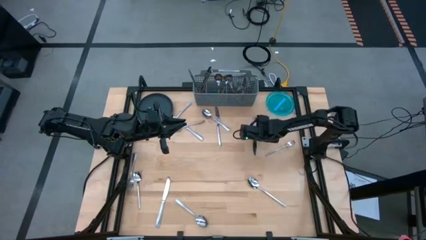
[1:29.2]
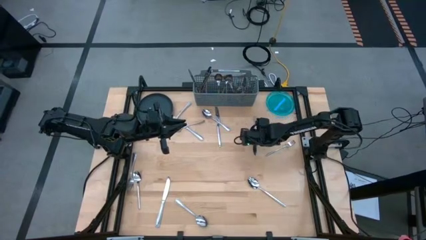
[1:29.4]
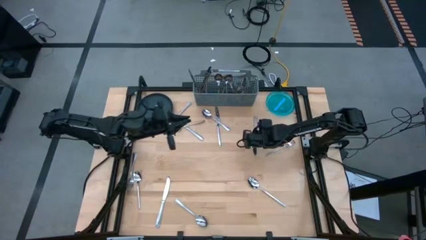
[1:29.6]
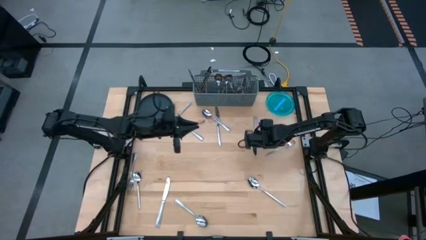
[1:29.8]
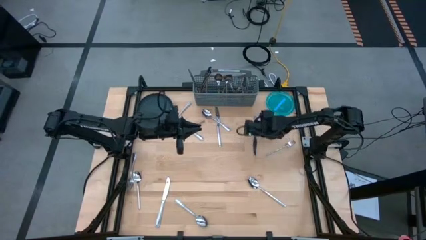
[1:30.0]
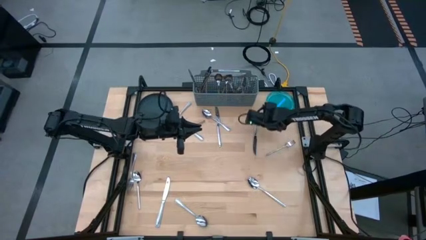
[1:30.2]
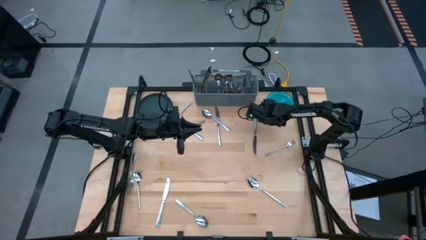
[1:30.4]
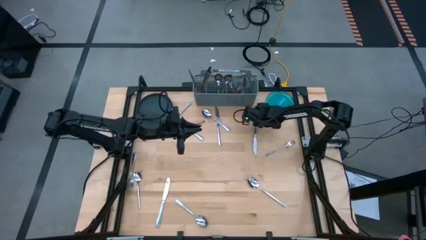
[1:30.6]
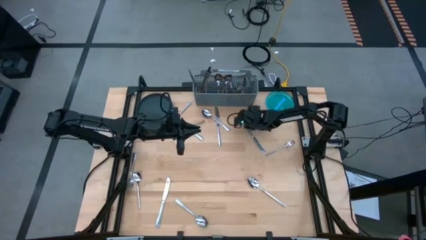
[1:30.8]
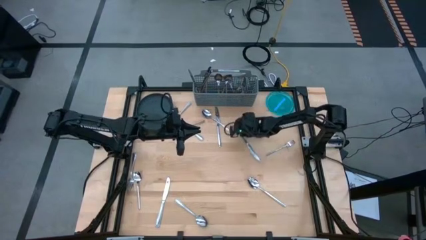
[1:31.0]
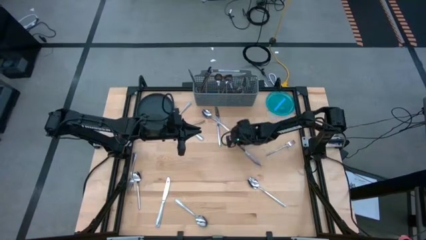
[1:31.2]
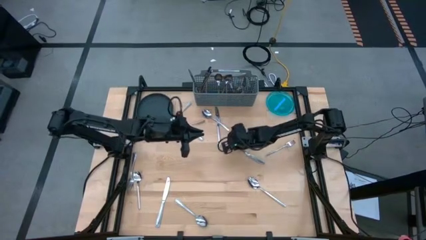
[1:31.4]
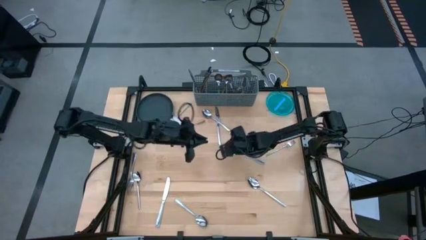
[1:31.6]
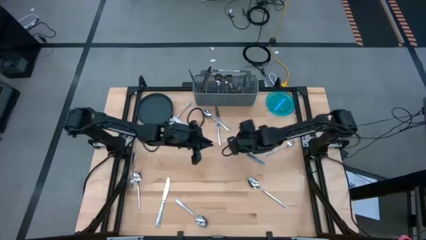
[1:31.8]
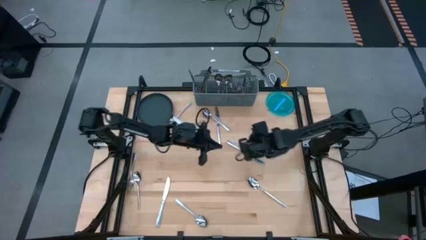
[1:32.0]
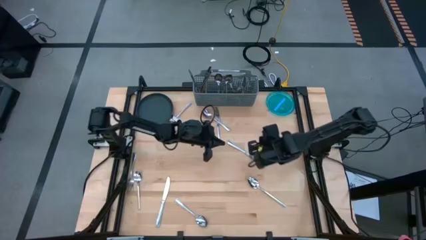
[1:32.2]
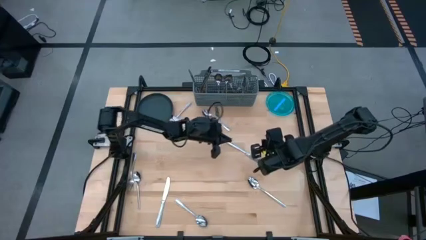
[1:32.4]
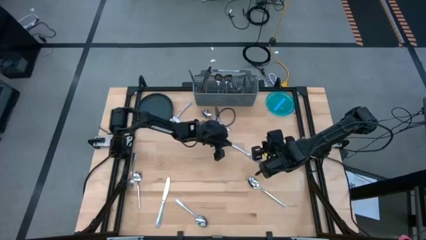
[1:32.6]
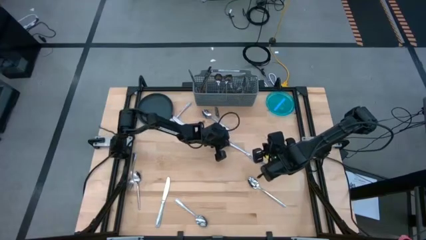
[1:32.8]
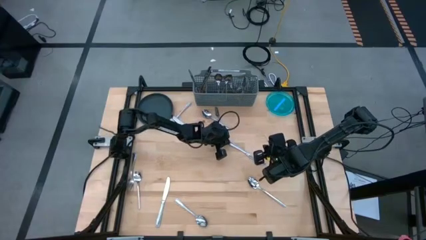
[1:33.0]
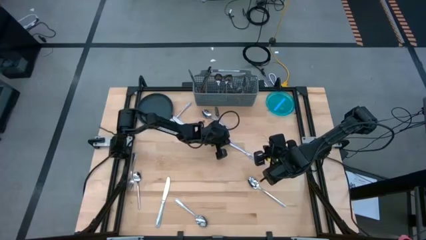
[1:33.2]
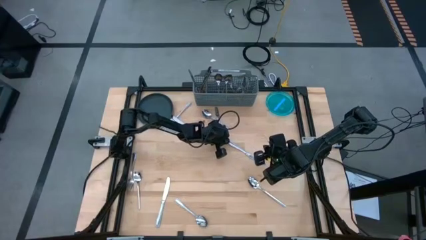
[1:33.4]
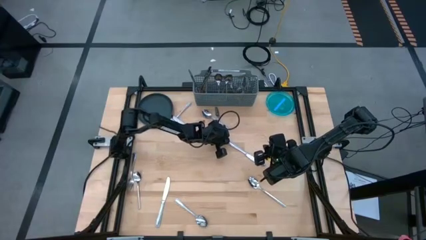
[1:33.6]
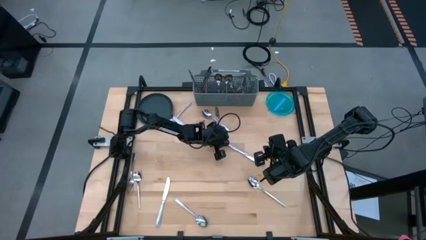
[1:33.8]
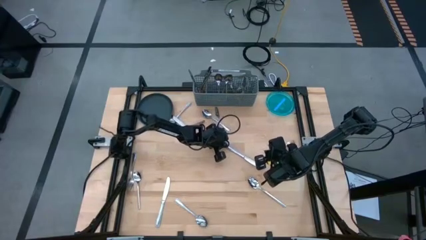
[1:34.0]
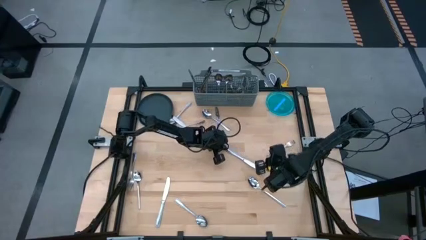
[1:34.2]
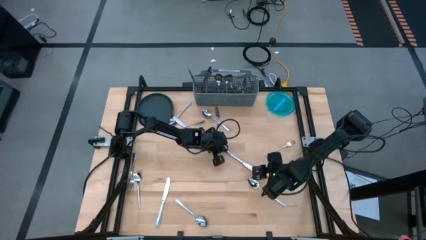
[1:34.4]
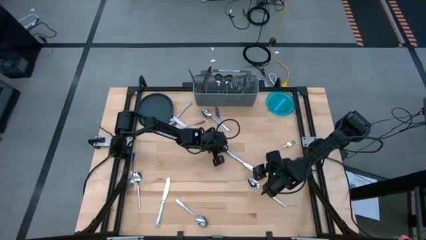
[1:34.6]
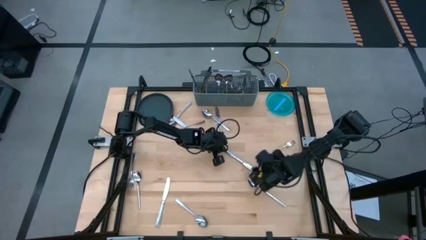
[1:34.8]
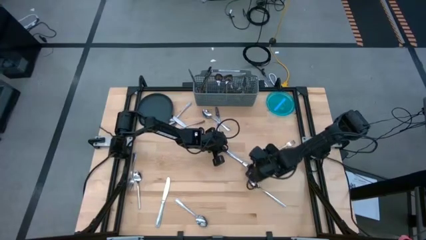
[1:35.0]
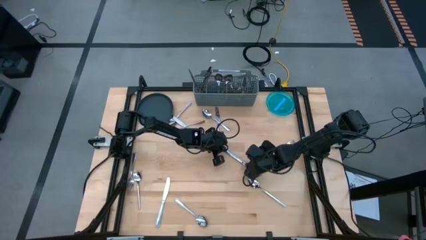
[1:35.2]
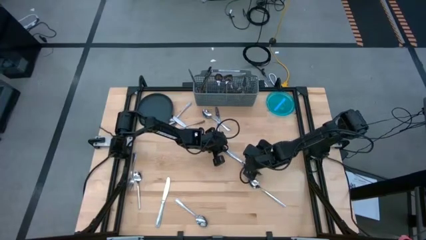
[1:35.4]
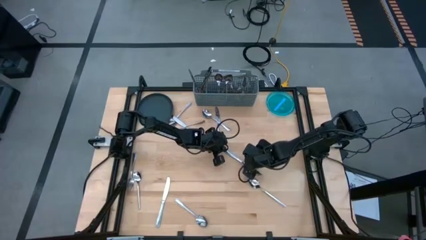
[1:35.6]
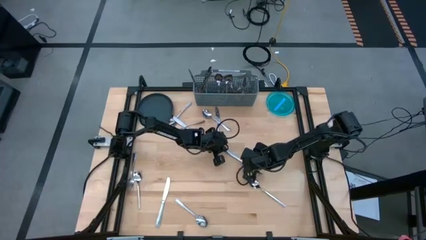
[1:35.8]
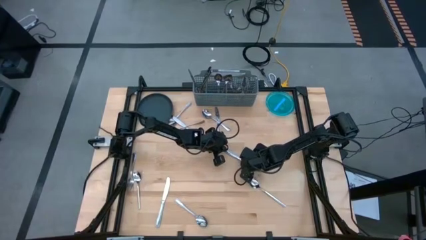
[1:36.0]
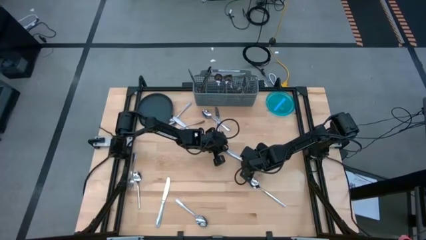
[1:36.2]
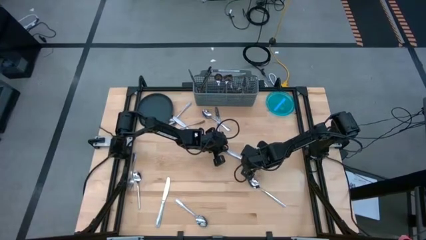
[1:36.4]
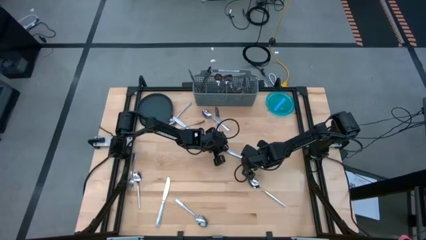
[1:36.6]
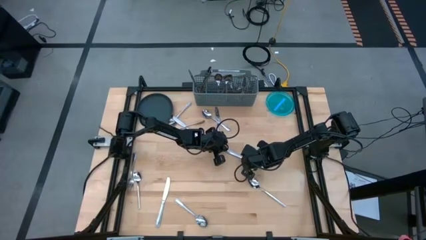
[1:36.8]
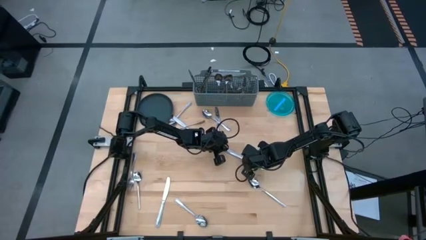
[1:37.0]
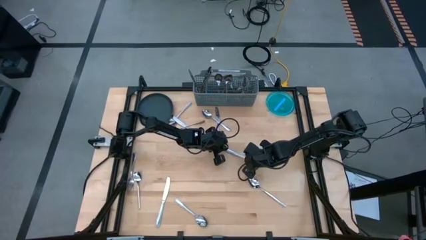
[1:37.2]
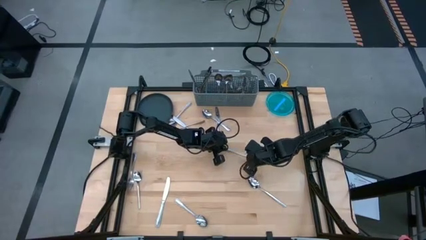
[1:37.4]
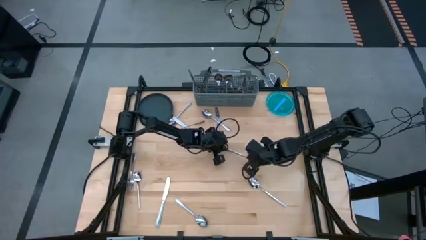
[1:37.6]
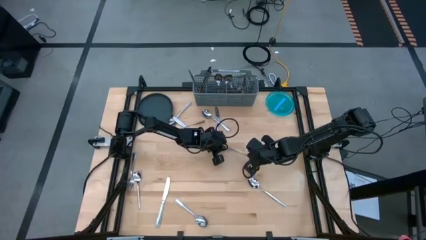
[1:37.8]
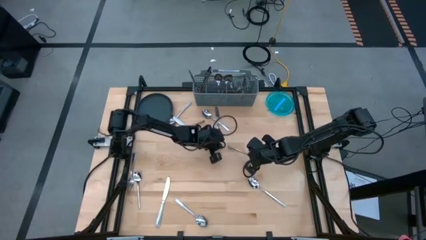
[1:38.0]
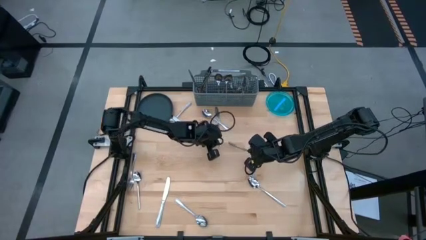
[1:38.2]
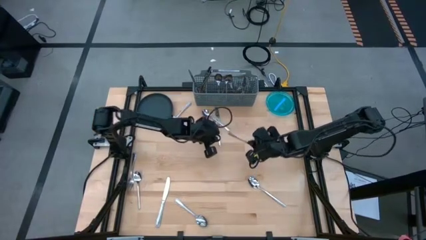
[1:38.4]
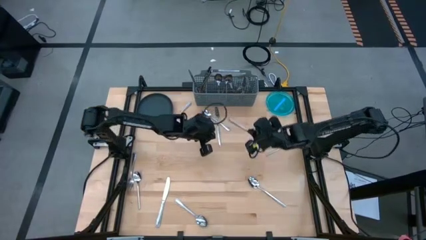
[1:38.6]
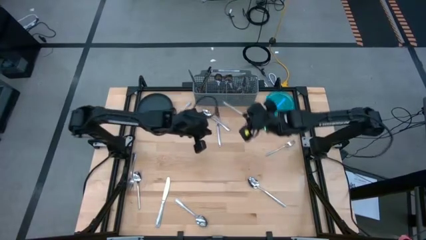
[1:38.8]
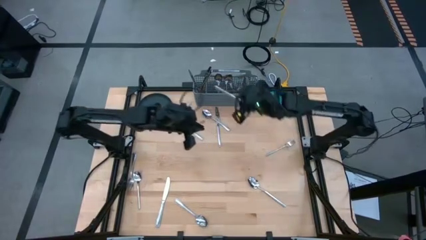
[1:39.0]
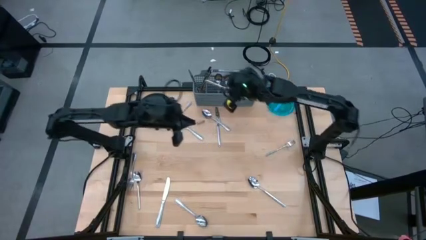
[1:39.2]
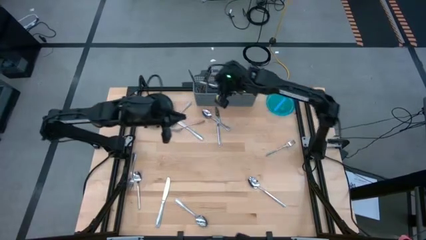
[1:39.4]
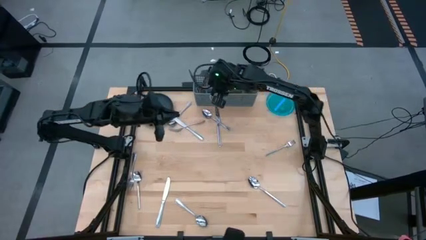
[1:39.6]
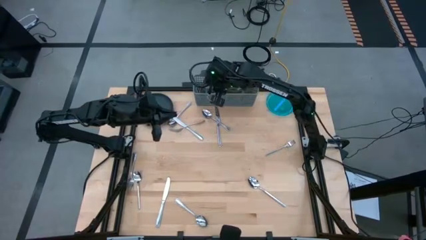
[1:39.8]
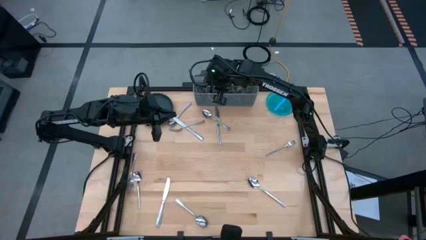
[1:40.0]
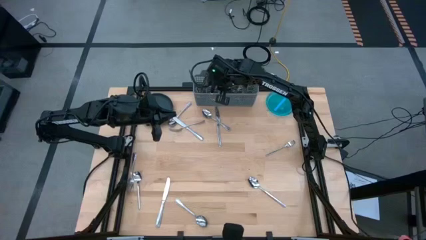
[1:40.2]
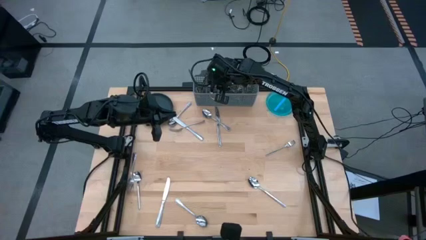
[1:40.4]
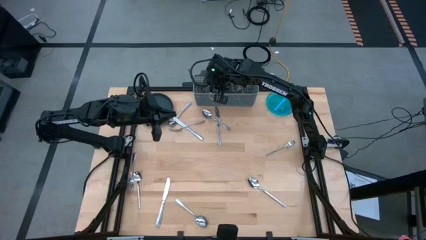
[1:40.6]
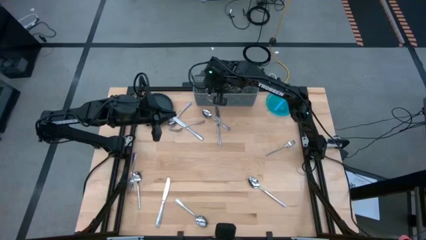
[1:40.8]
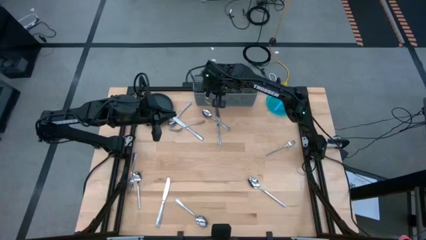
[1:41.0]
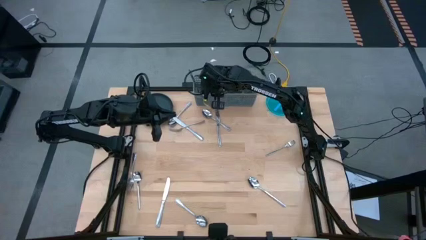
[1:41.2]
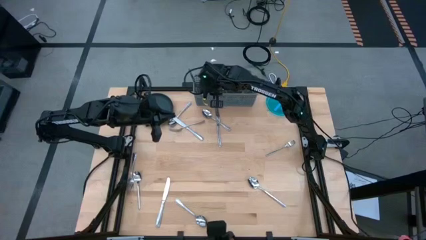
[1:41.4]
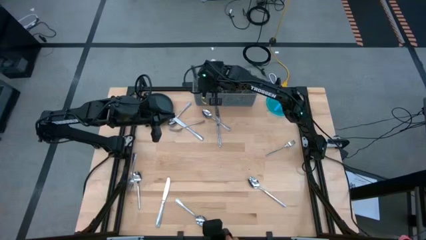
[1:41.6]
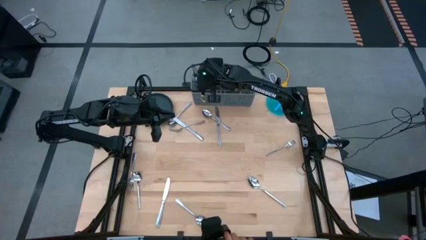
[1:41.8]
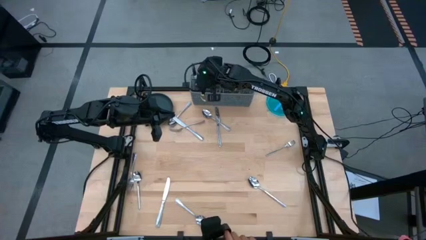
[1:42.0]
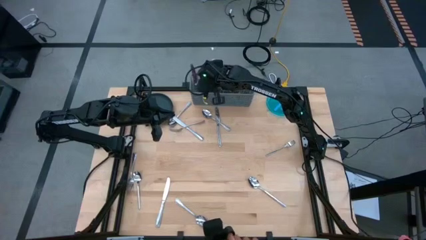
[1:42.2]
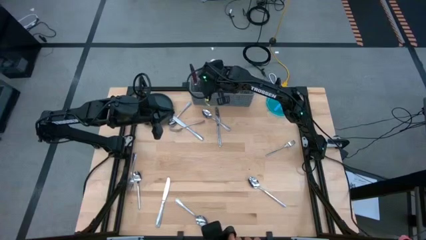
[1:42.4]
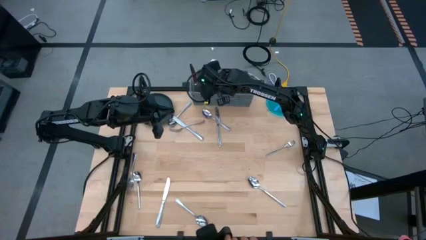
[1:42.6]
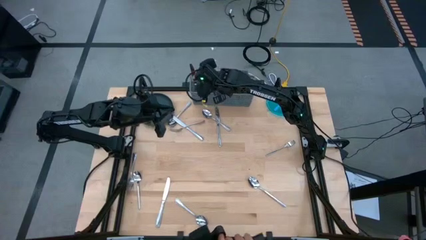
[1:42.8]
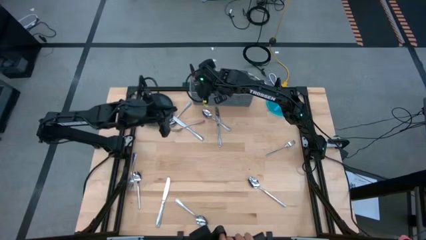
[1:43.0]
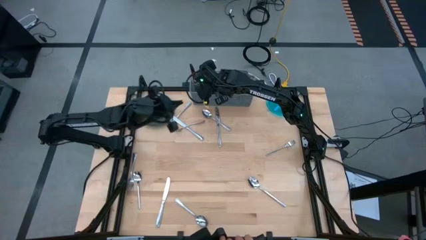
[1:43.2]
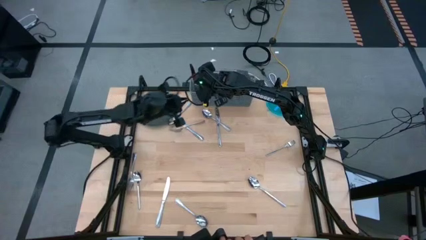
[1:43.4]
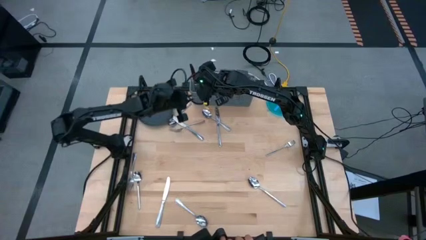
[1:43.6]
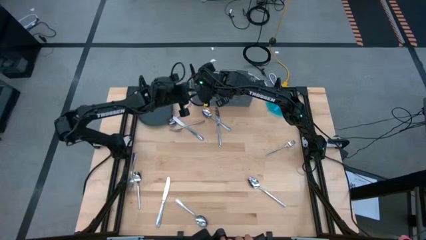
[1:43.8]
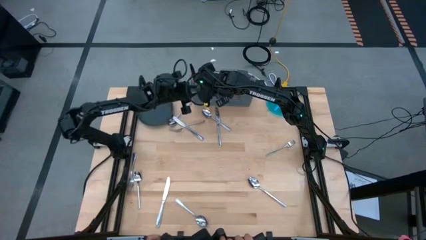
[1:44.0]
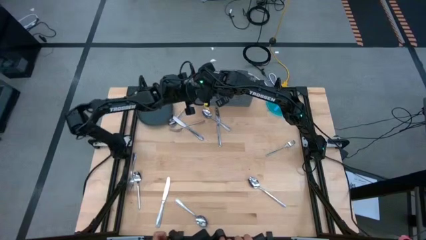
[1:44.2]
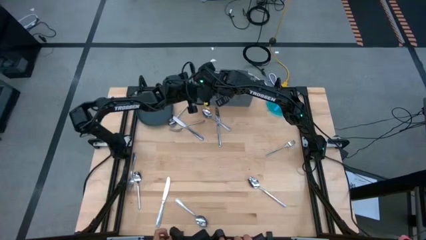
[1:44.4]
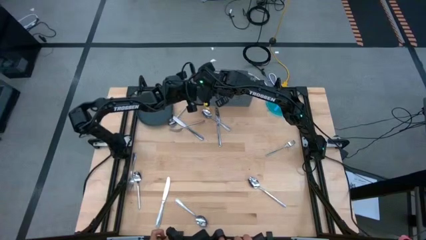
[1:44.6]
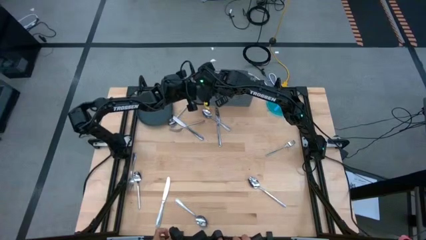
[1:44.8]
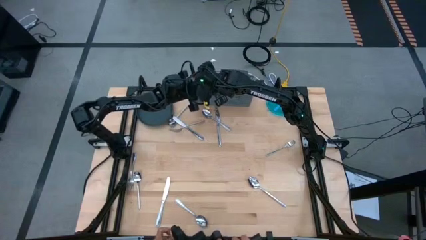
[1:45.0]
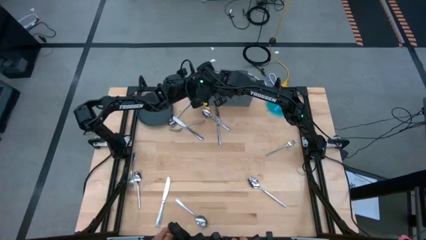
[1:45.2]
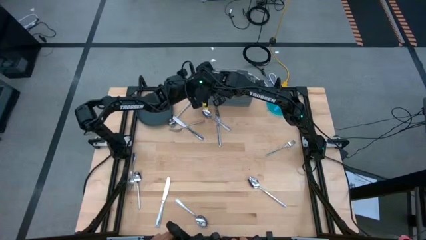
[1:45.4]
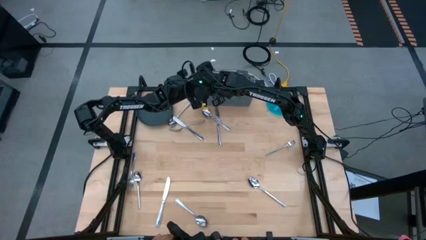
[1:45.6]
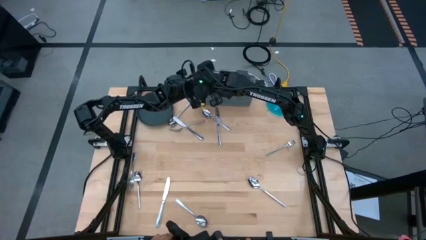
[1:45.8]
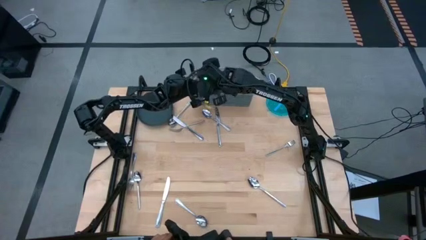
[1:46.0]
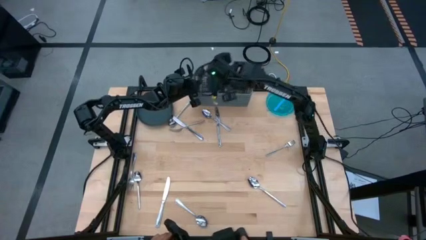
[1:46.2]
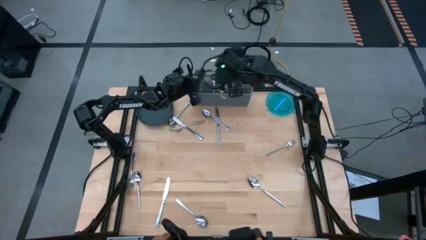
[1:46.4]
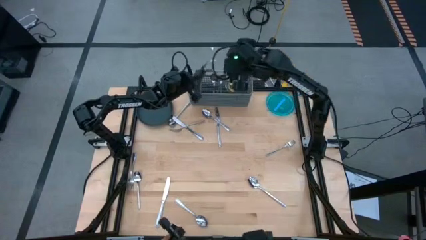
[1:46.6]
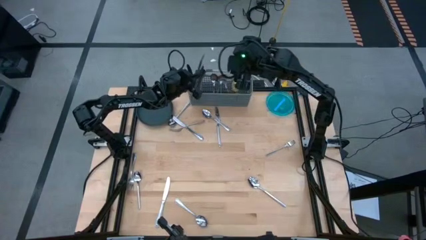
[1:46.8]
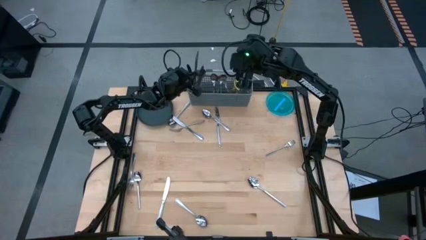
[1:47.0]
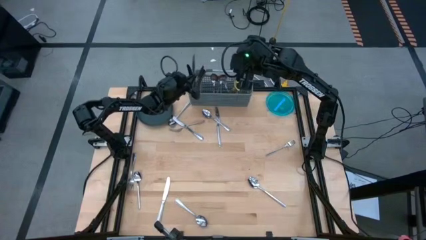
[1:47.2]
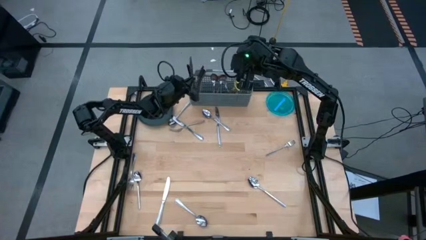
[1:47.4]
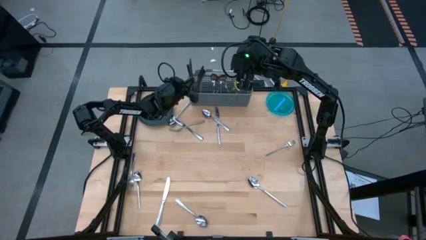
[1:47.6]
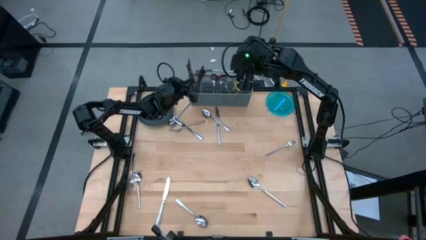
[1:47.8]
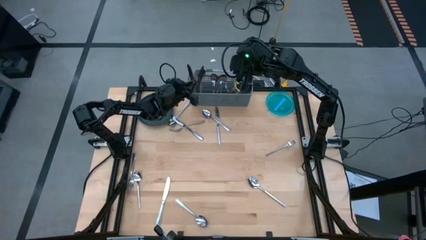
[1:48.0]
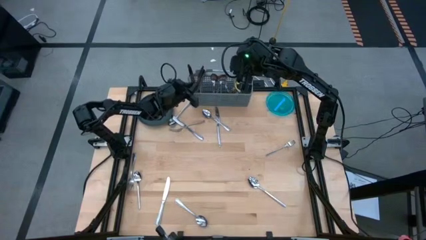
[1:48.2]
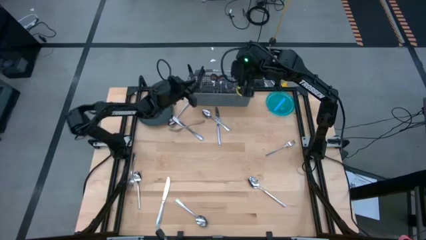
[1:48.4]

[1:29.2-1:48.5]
Task: Sort silverware
Put the knife into the silverware basket
